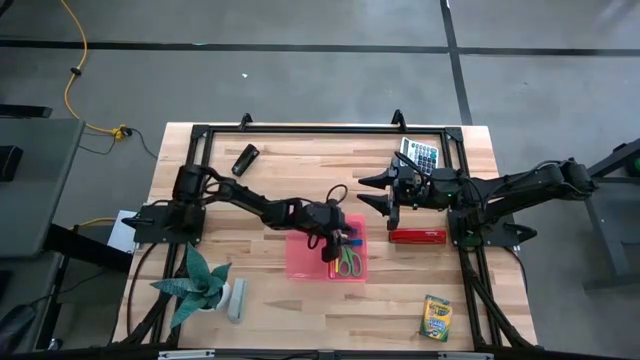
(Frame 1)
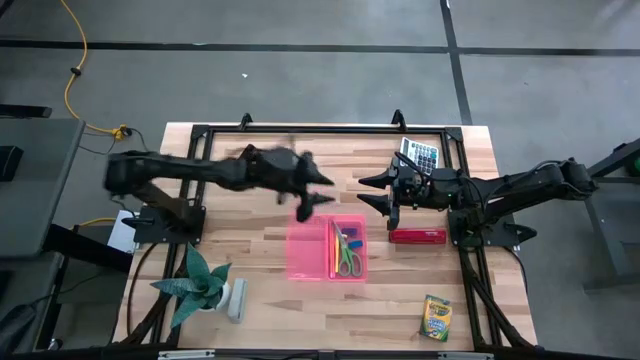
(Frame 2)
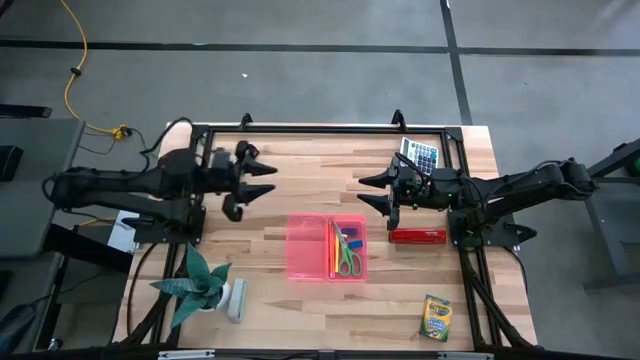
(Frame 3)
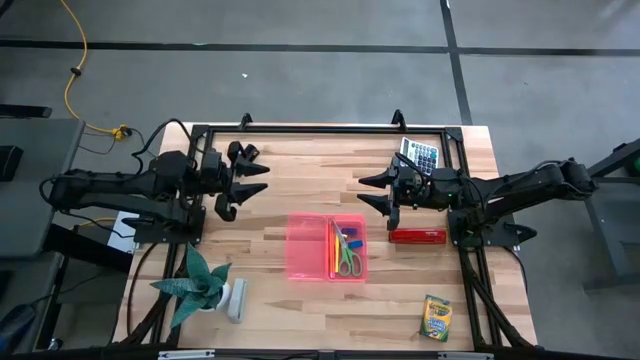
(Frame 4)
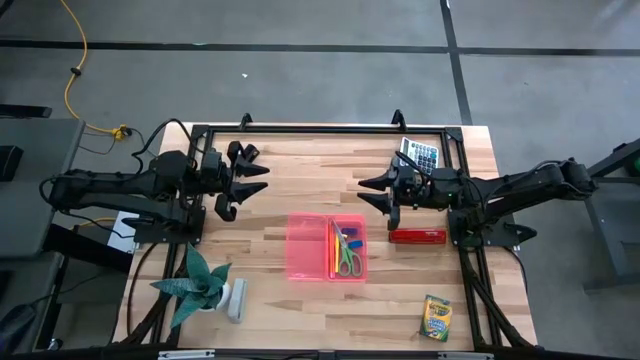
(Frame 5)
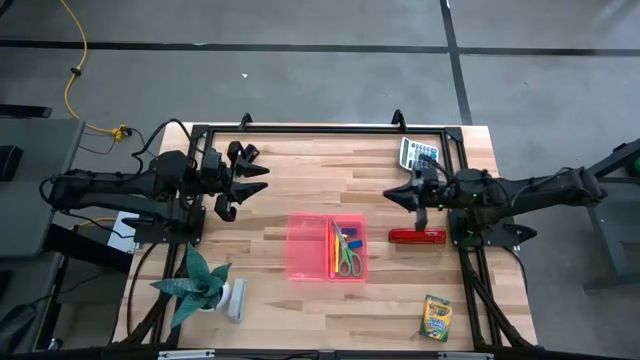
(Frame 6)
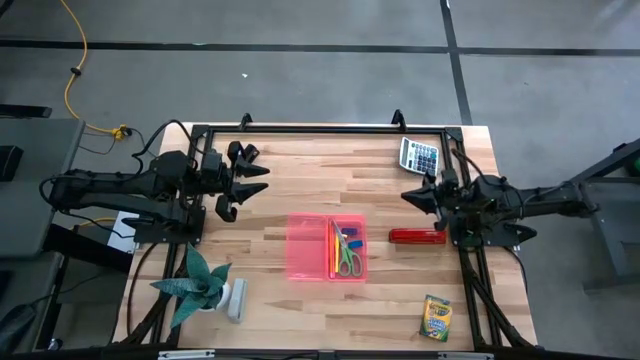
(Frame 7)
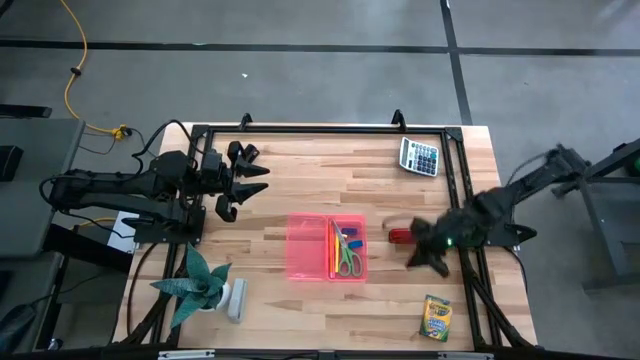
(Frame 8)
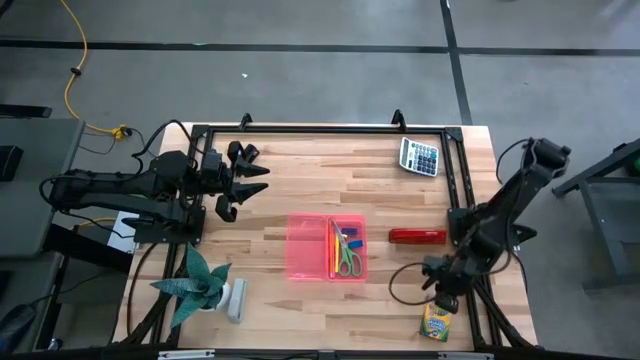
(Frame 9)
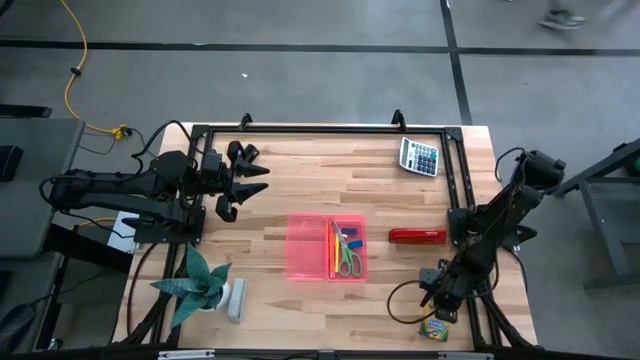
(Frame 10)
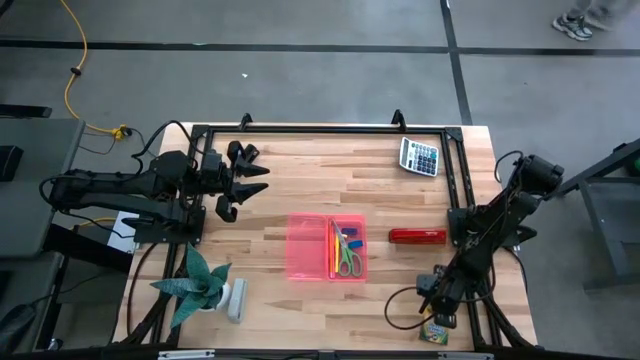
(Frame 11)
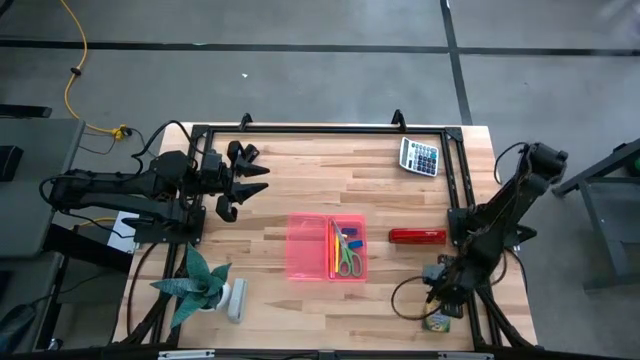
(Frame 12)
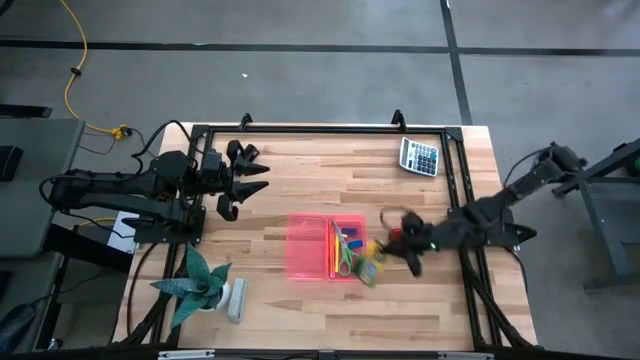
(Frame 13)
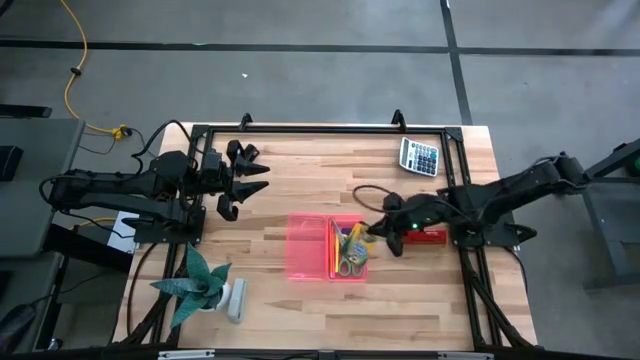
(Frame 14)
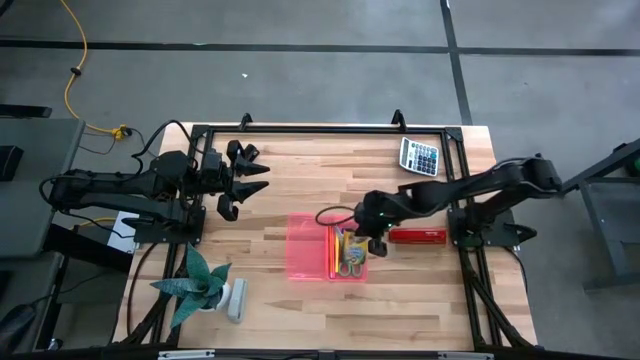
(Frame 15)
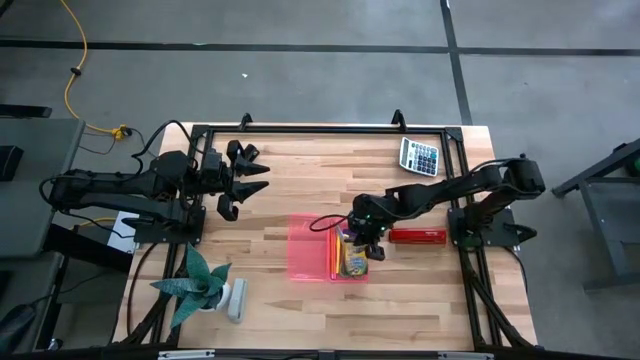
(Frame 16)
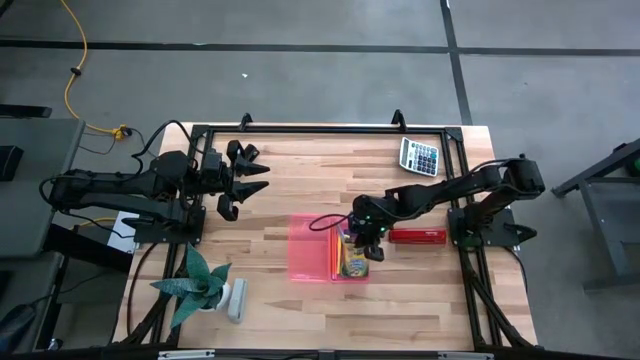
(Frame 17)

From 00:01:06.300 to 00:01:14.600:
Task: Pack school essentials
Put the crayons box into the pink supply box

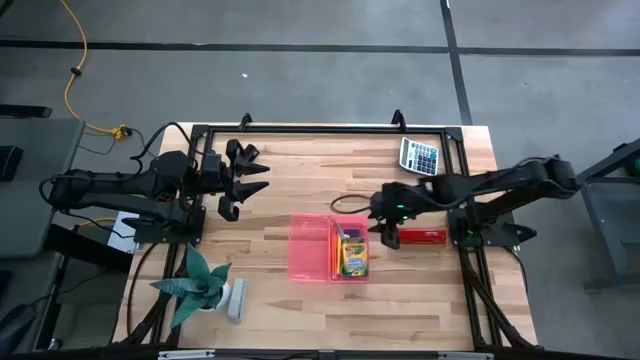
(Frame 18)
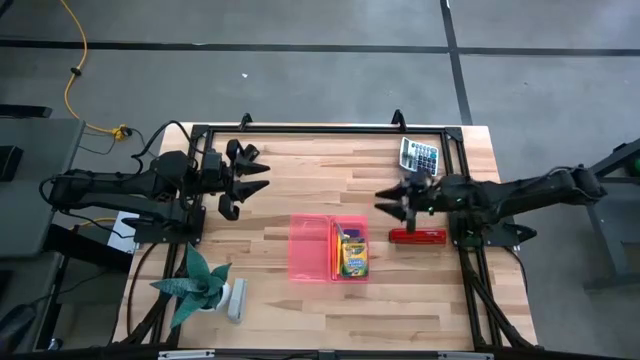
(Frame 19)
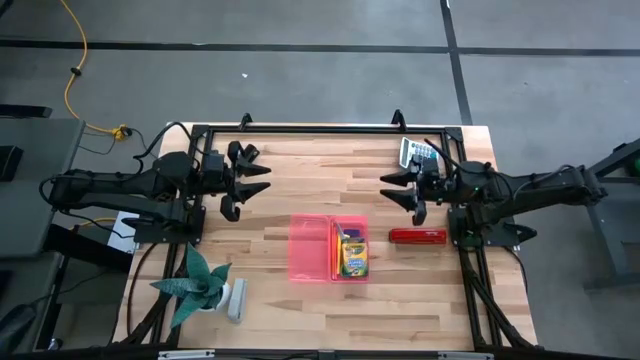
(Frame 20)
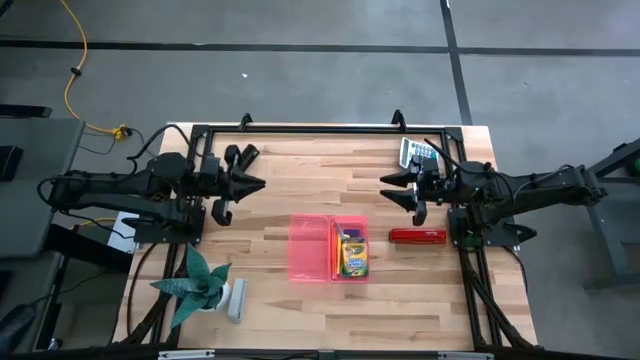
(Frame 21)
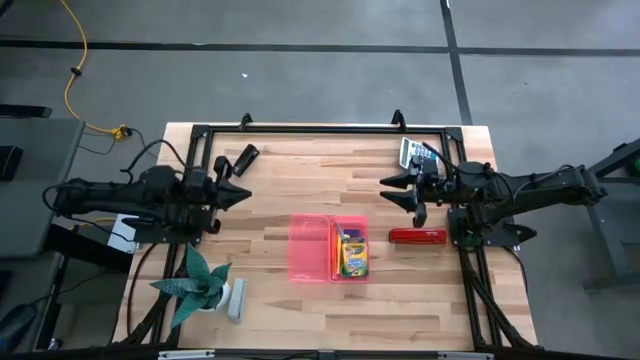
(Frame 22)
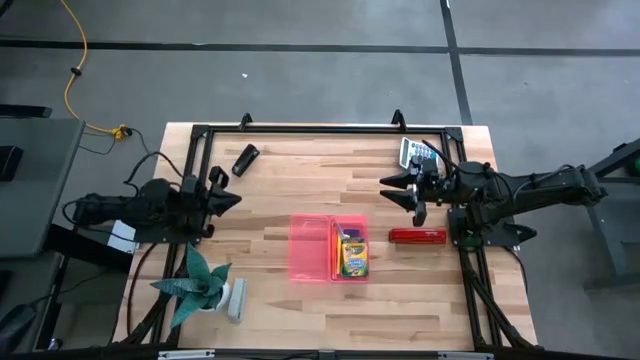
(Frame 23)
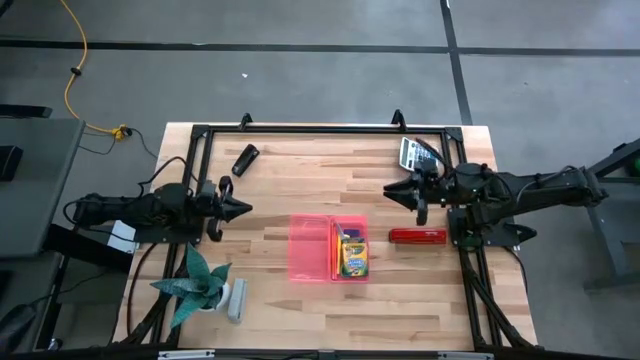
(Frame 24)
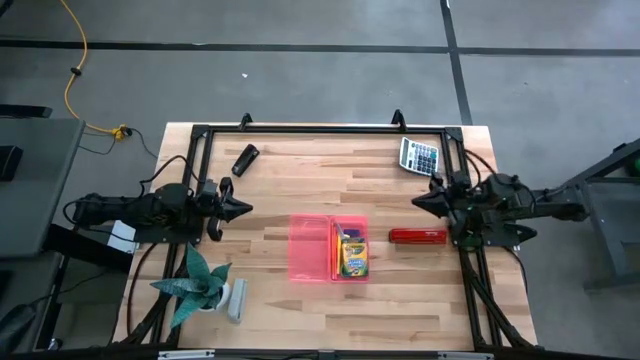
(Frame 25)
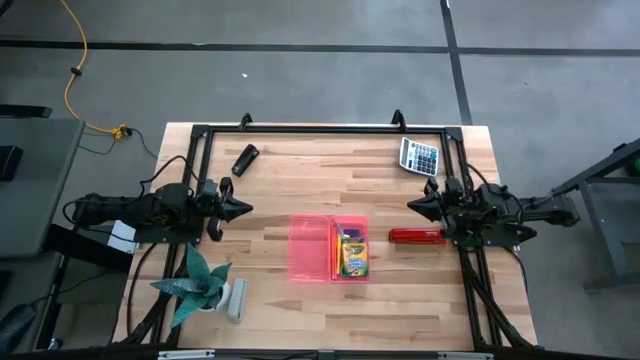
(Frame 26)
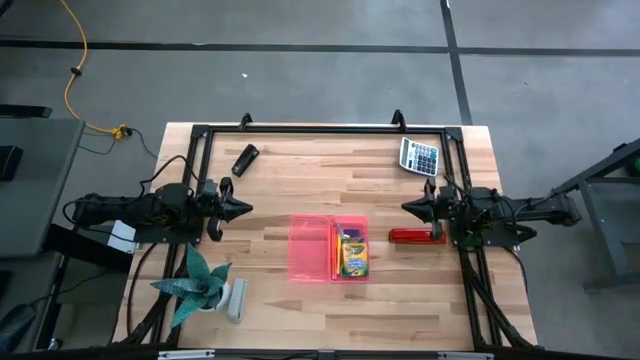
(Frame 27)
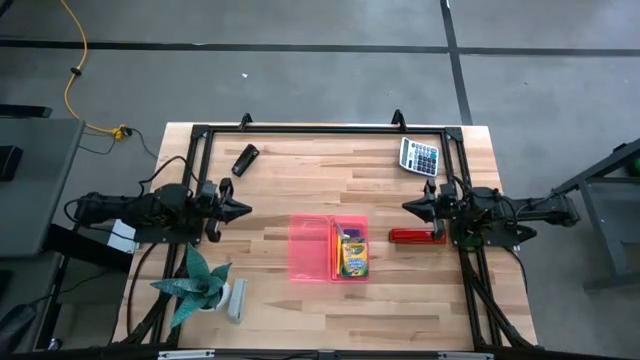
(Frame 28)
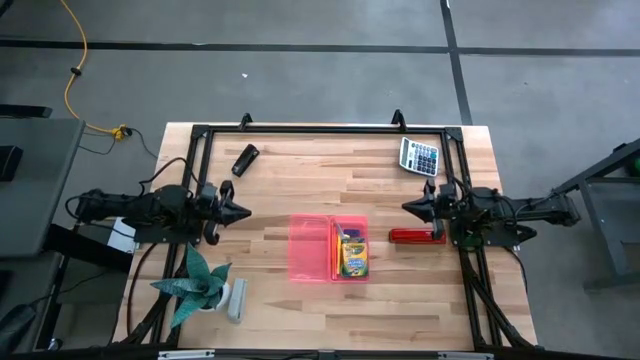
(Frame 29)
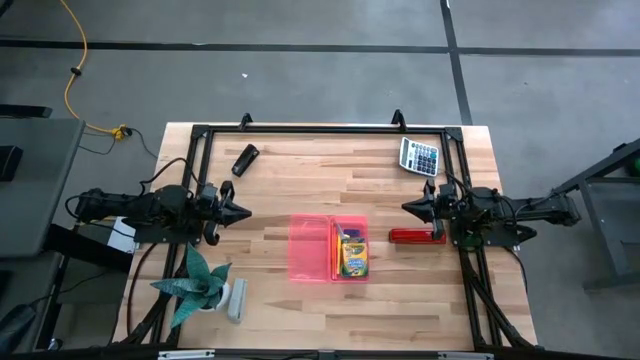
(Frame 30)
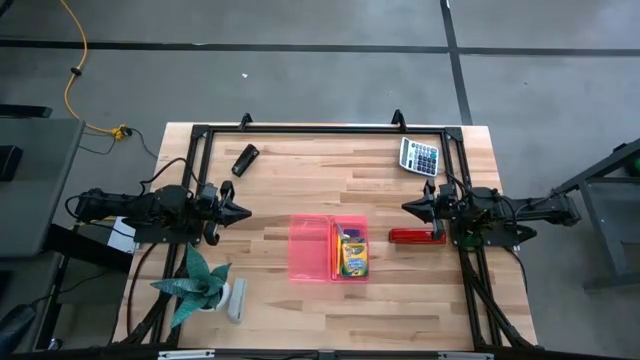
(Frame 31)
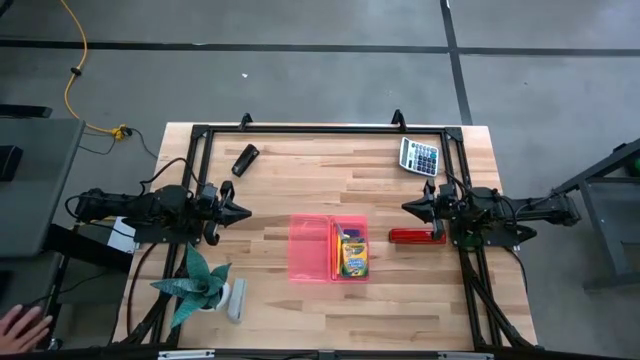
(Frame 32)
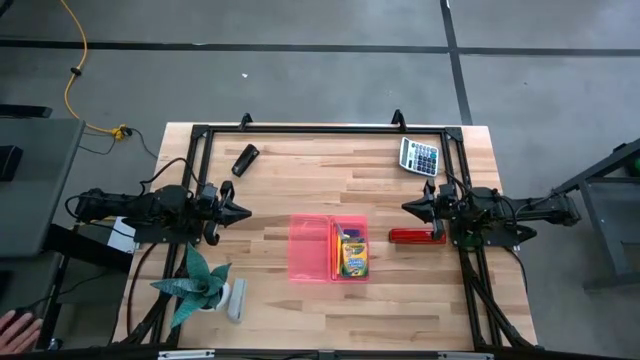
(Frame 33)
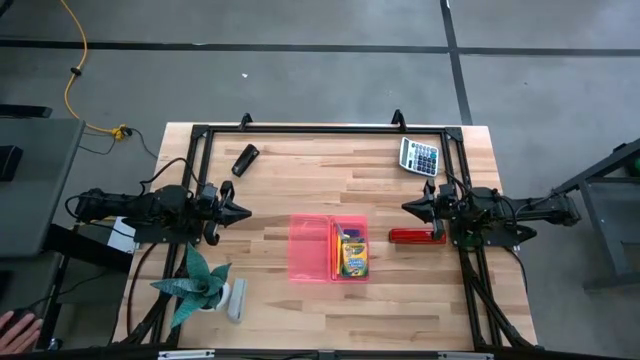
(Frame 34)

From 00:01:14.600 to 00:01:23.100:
Return to Home Position

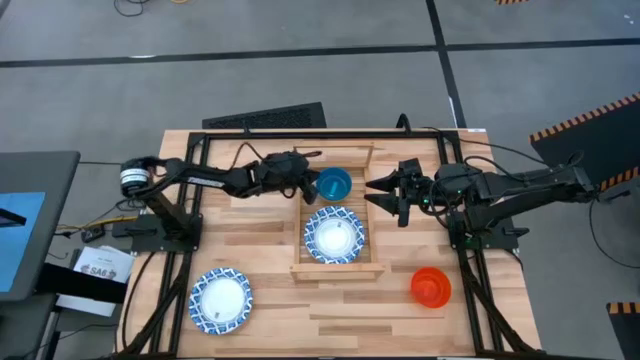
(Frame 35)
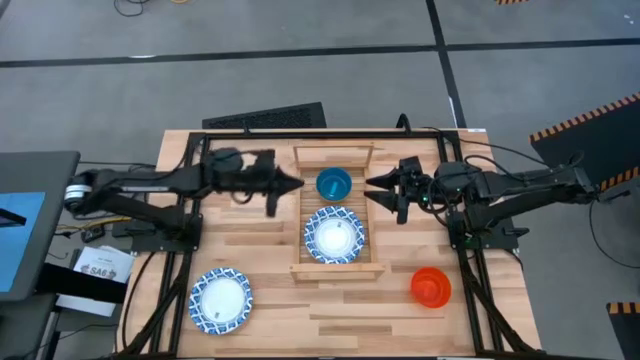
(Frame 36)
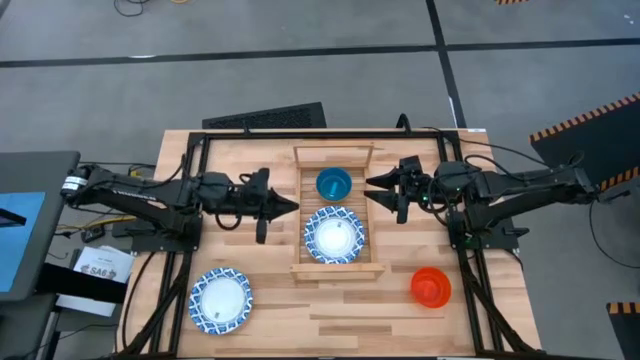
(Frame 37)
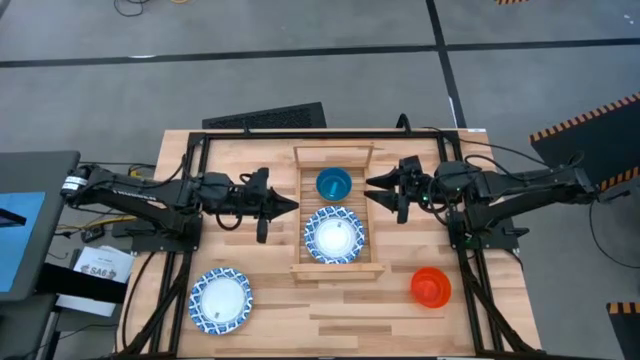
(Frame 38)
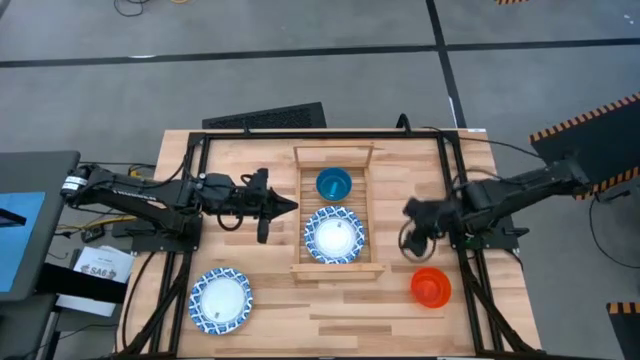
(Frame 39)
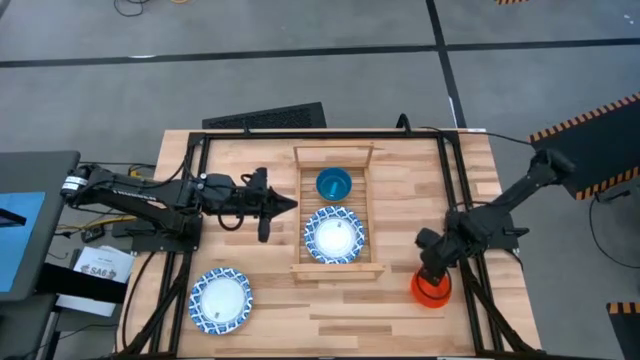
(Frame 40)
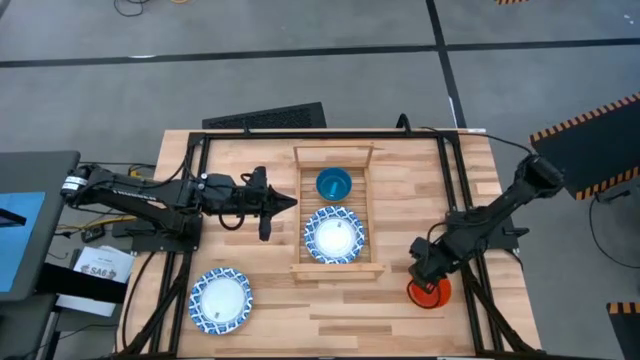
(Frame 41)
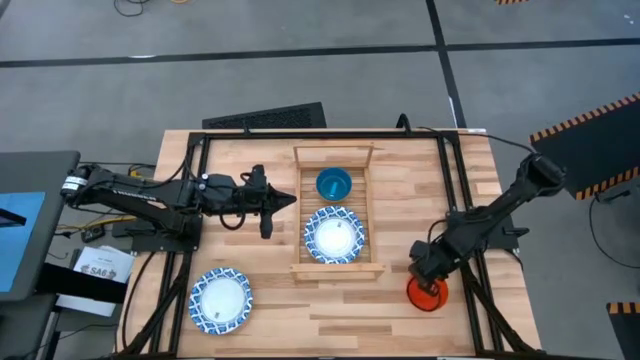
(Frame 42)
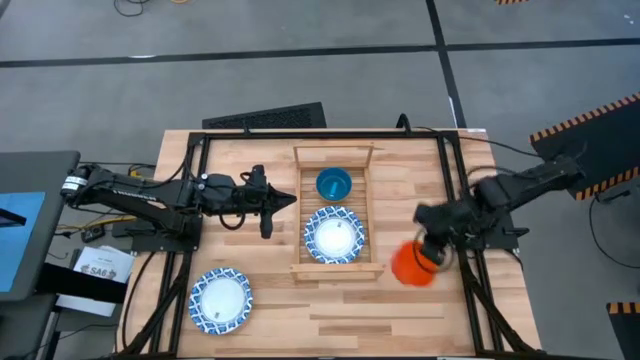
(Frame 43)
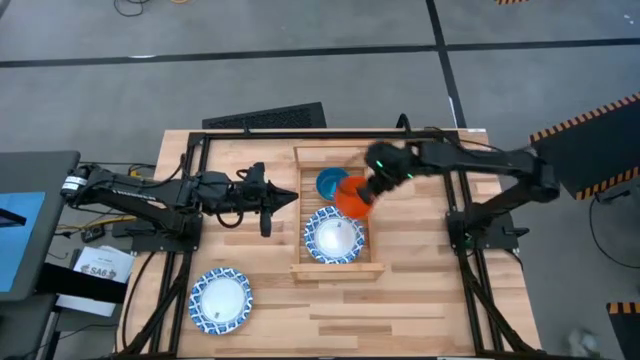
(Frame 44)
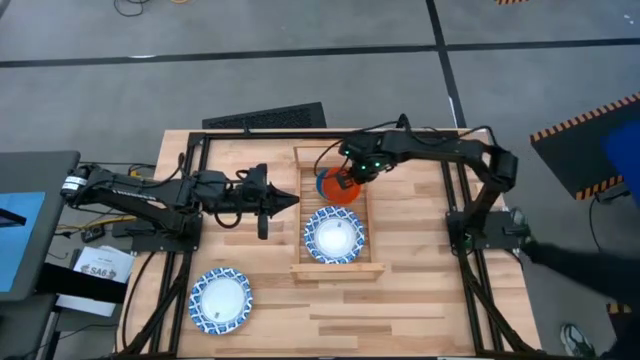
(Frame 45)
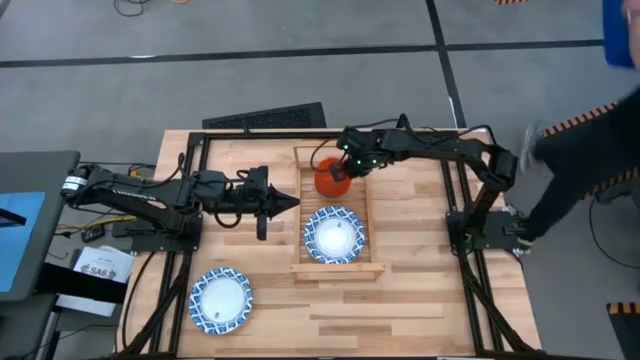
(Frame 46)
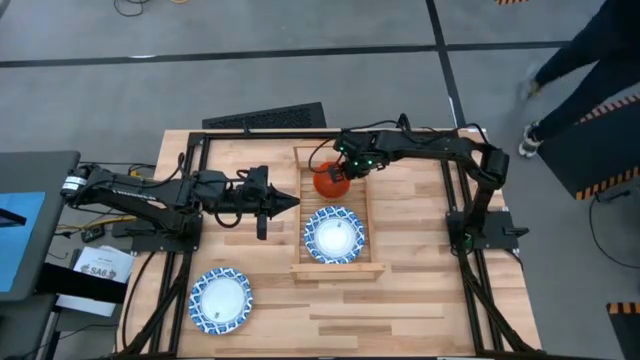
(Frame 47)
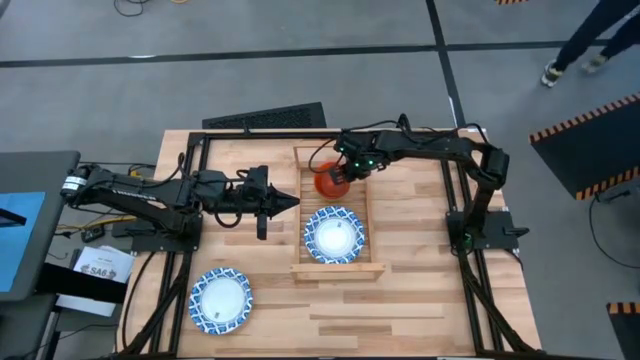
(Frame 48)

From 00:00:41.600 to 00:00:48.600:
Task: Place and stack bowls onto a shelf
Stack the orange bowl on top of the blue bowl on the shelf
